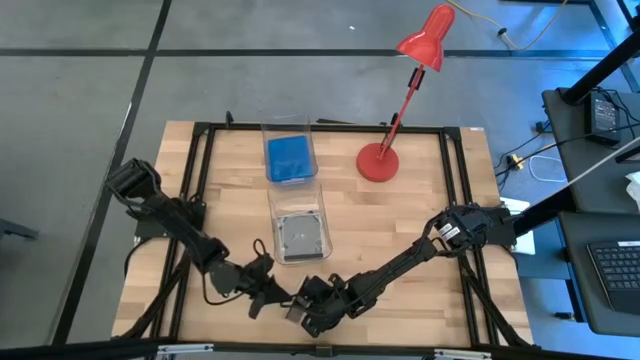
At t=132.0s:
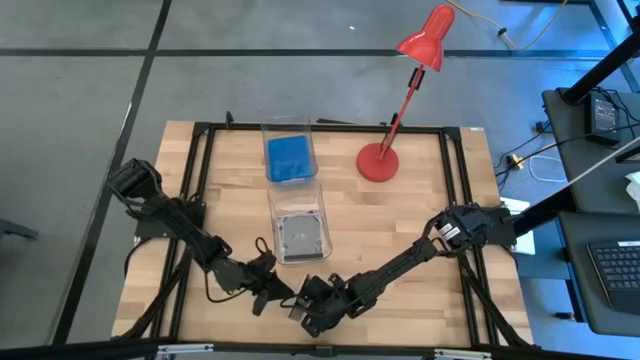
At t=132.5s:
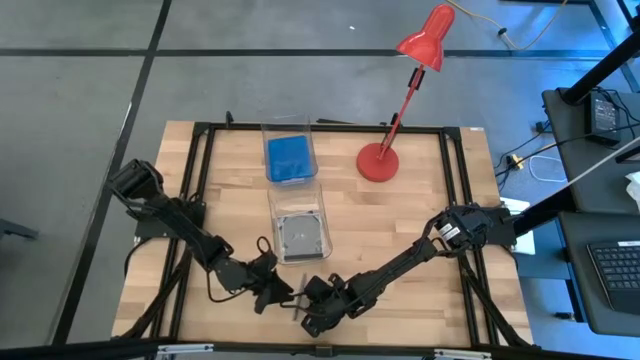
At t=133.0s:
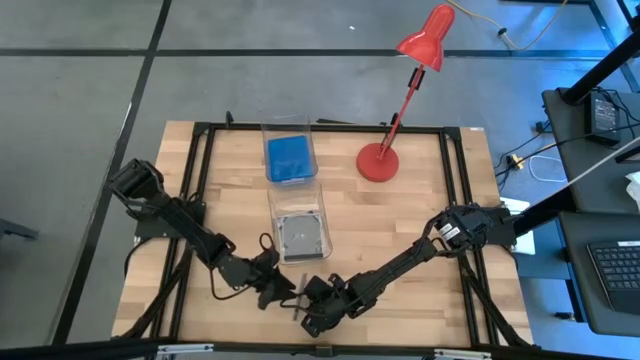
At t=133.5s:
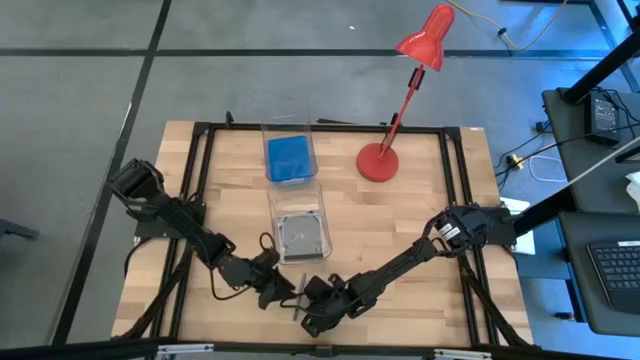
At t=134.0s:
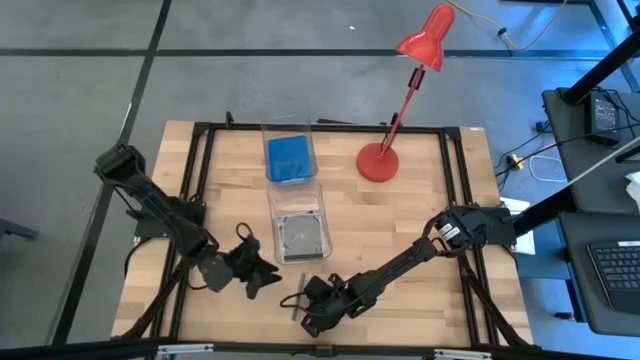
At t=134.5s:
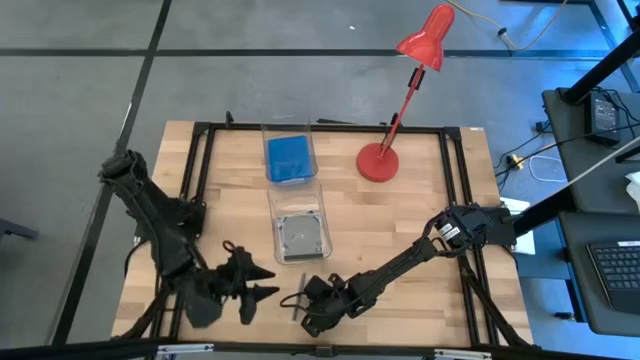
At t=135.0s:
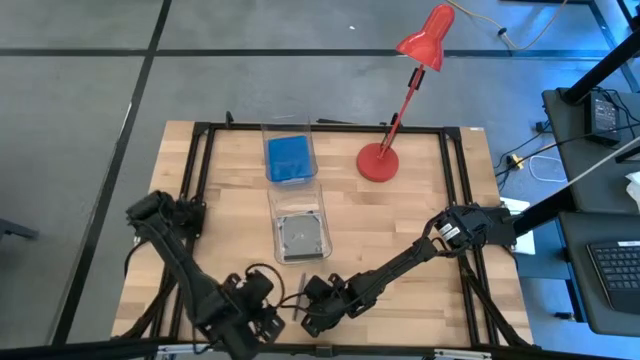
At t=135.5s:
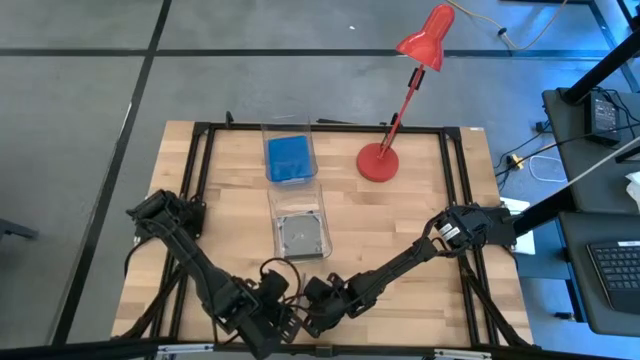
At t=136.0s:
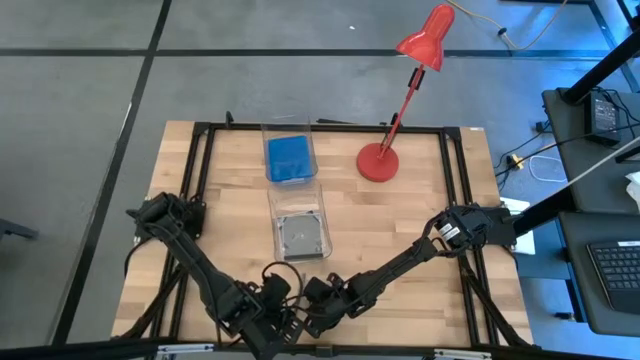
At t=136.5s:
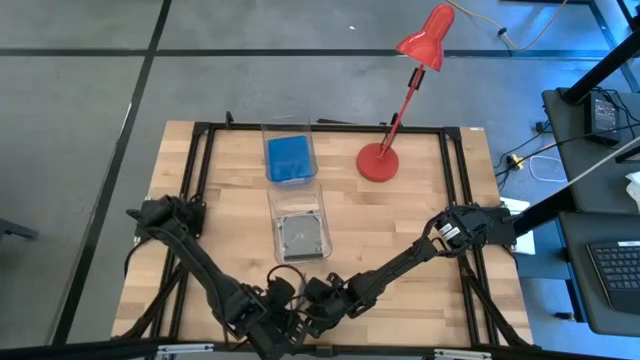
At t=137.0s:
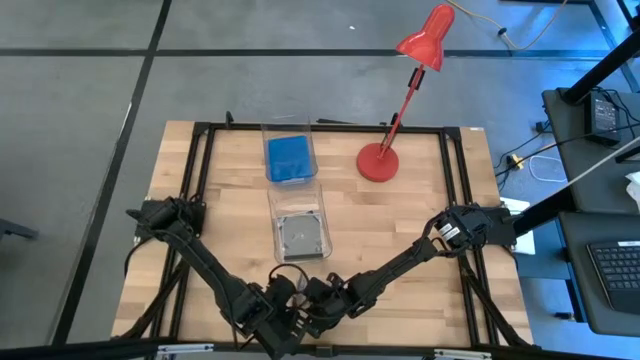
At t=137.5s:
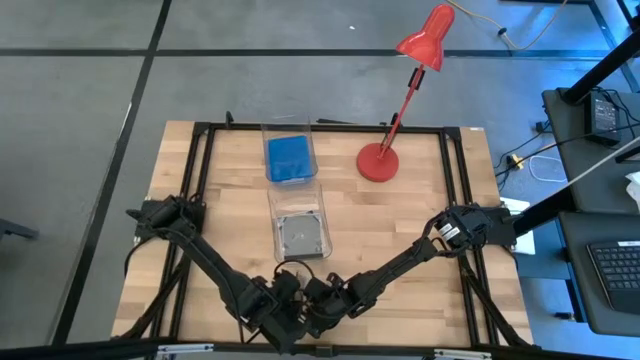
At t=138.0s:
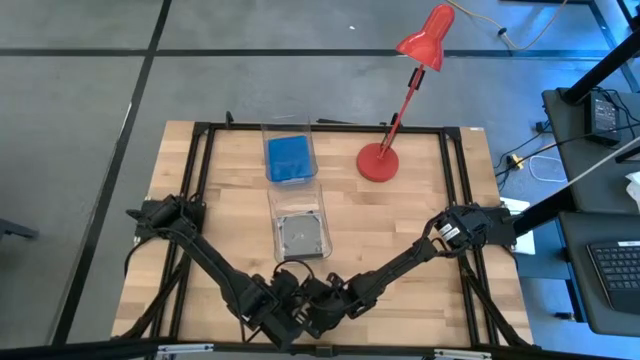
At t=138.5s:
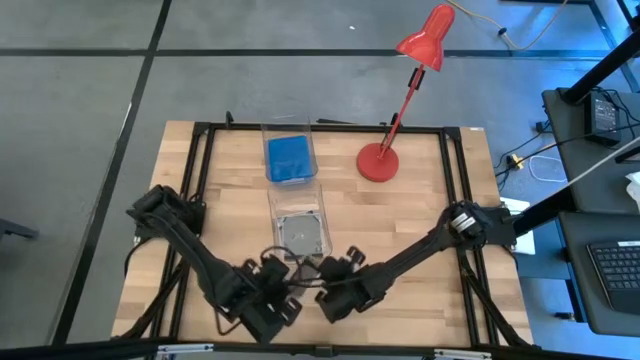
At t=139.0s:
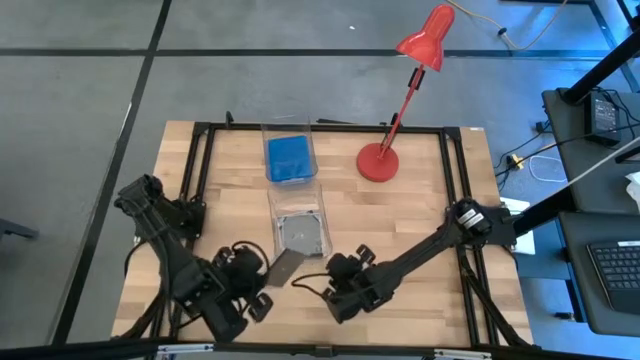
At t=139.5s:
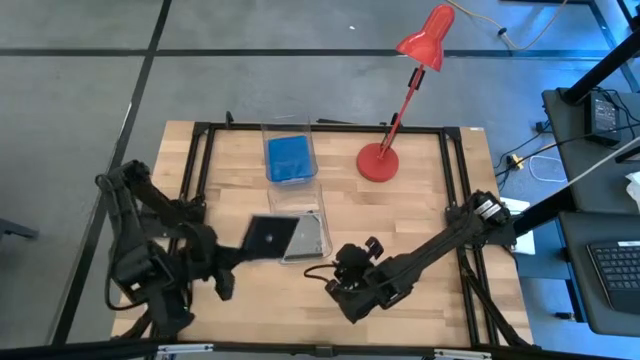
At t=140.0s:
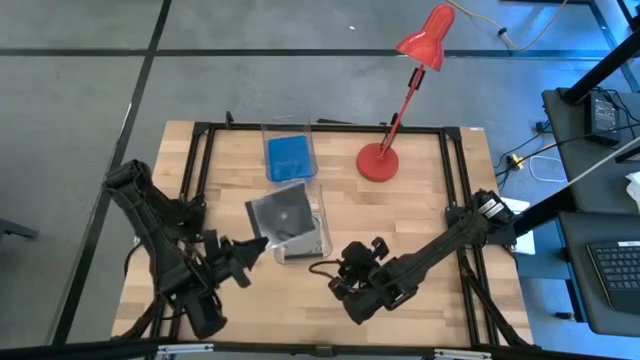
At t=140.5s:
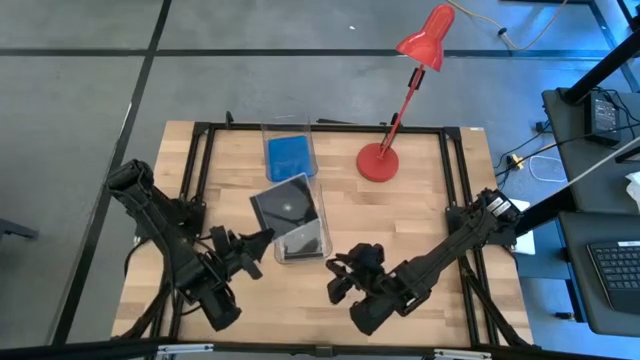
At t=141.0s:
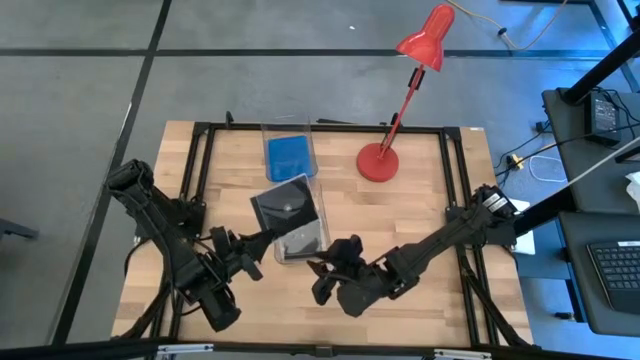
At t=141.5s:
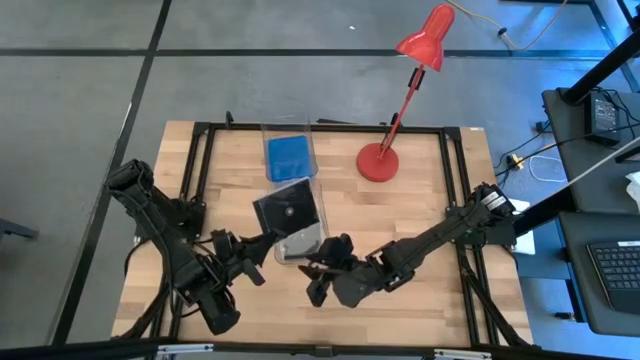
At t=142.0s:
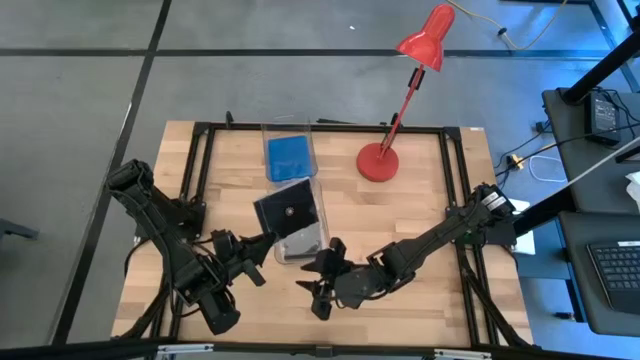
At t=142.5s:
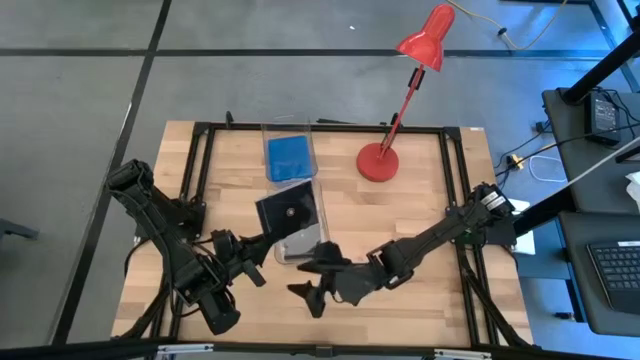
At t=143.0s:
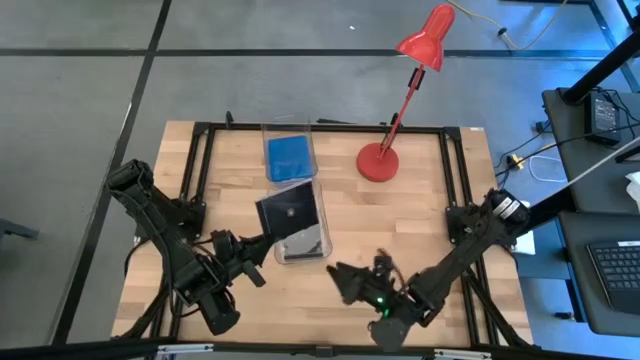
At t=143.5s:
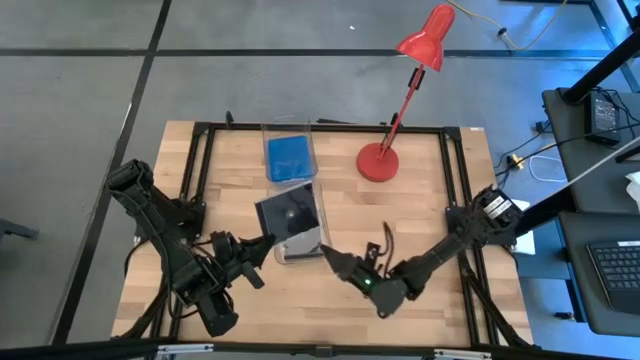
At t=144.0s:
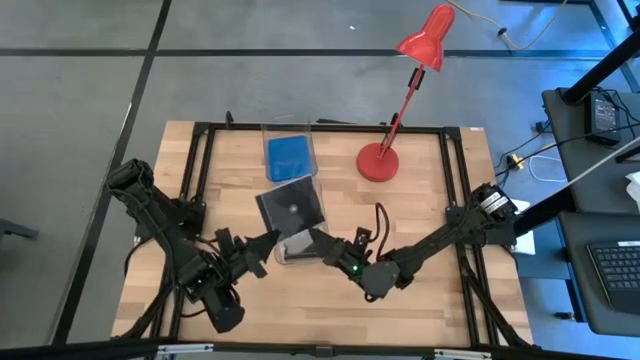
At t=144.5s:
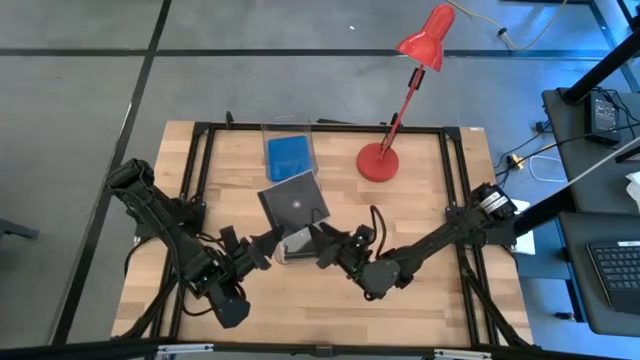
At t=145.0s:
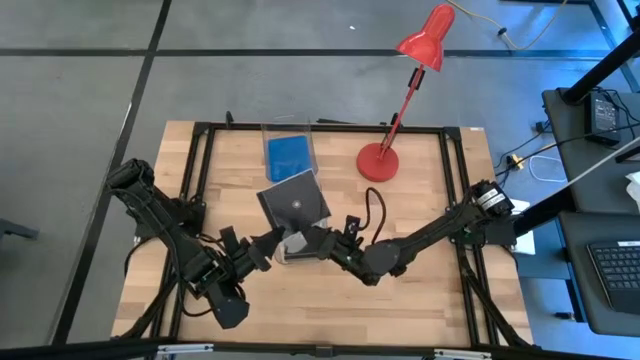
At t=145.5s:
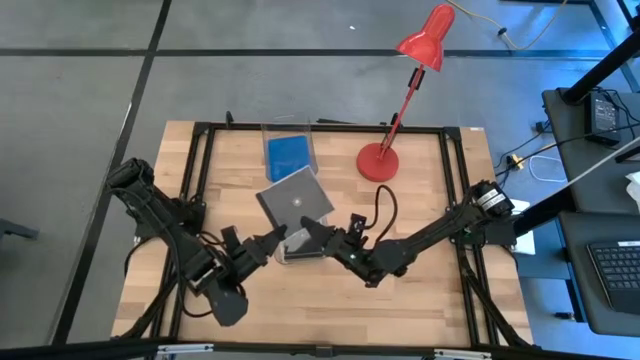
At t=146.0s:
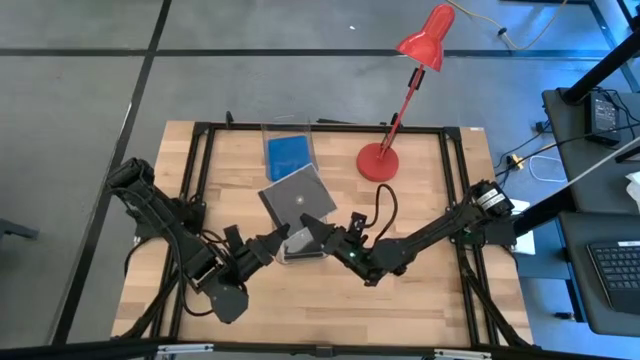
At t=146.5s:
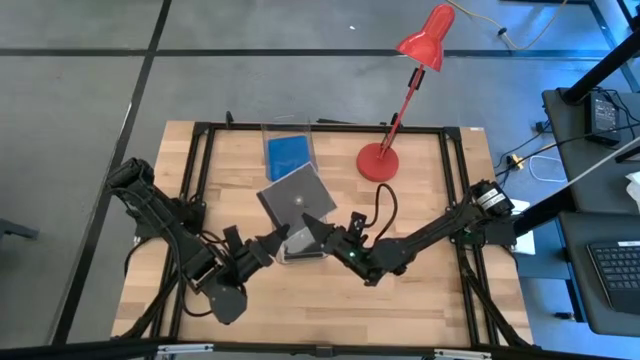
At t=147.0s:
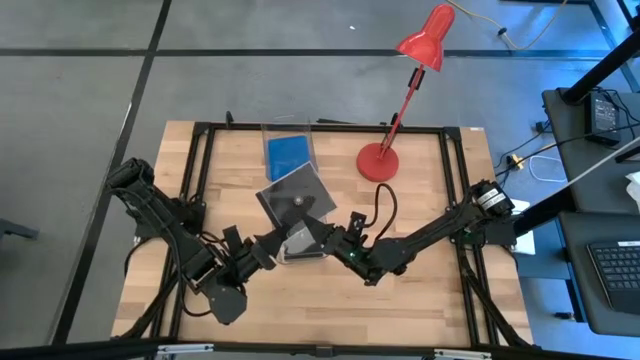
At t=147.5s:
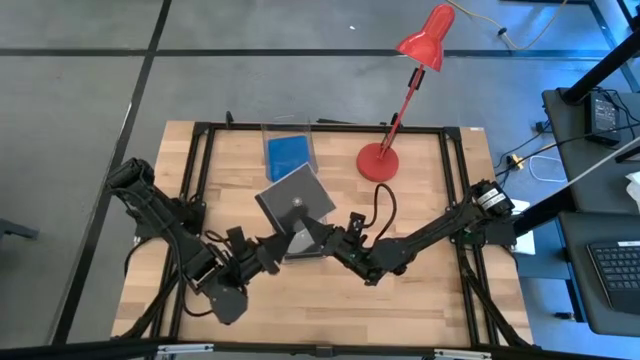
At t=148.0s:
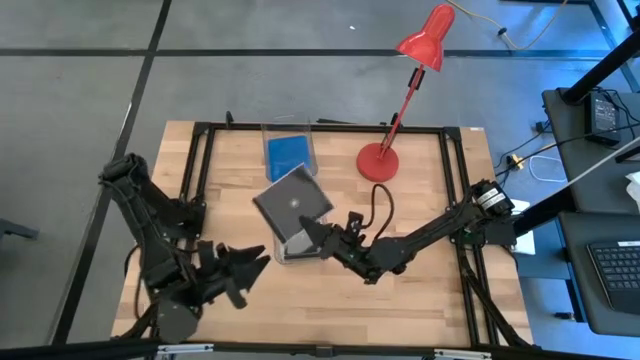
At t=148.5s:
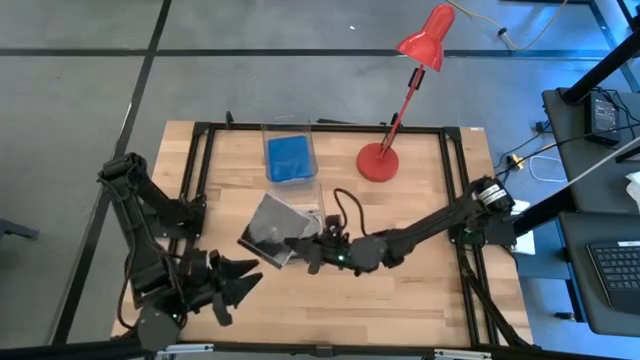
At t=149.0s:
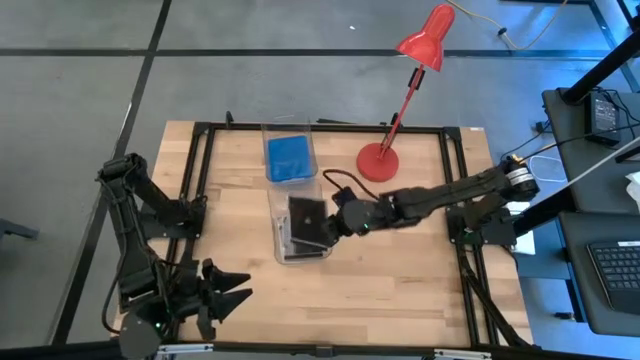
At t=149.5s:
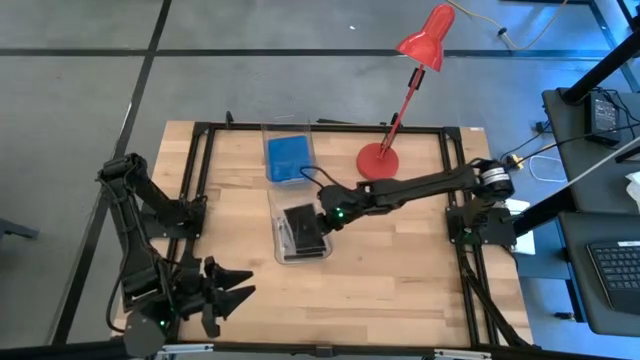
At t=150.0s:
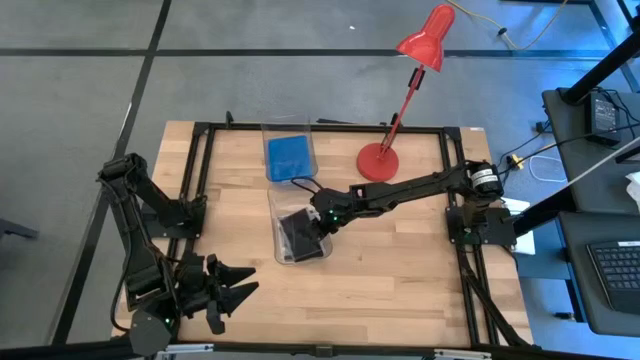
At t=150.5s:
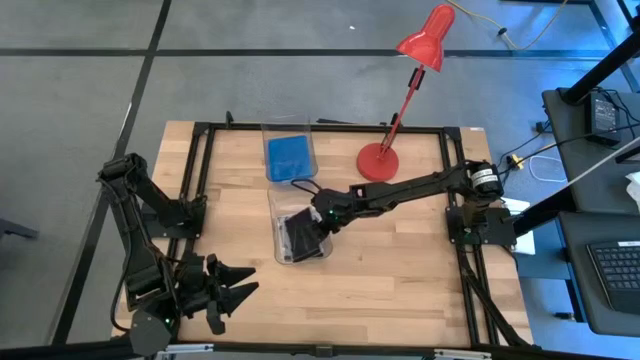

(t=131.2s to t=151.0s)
Task: Pick & place jewel cases by type
Put the black cd case into the bottom transparent bin

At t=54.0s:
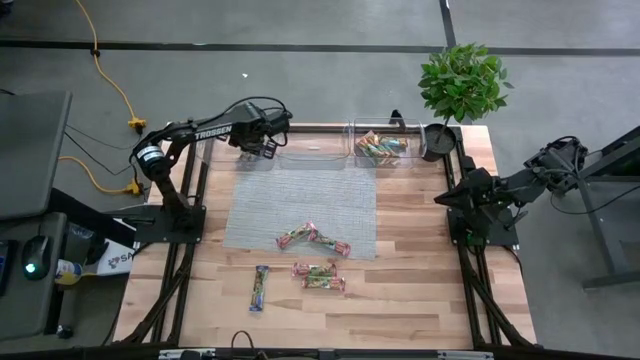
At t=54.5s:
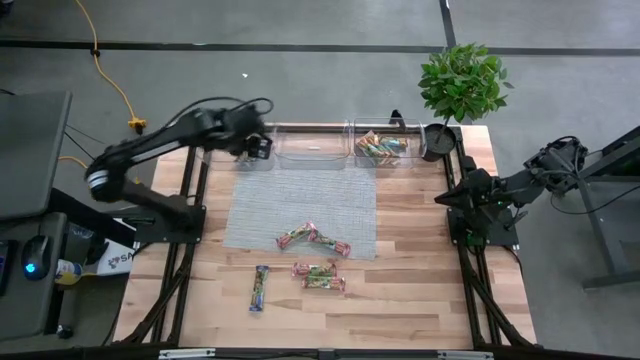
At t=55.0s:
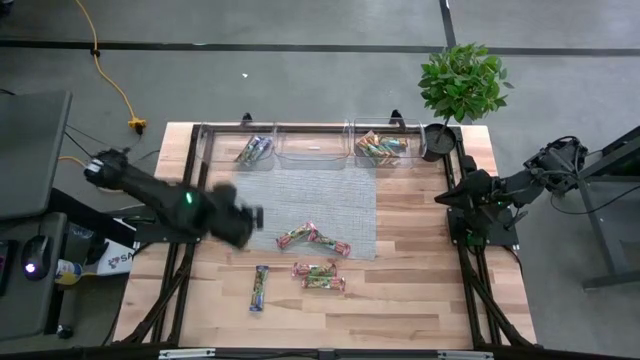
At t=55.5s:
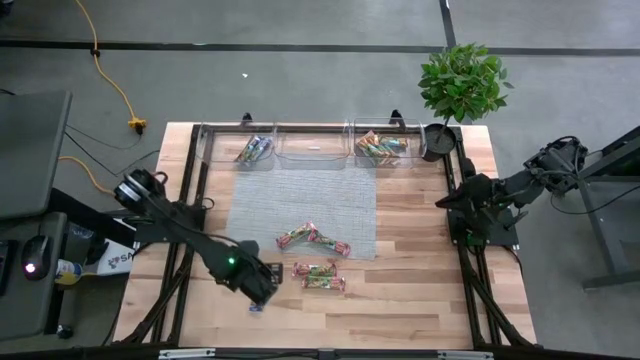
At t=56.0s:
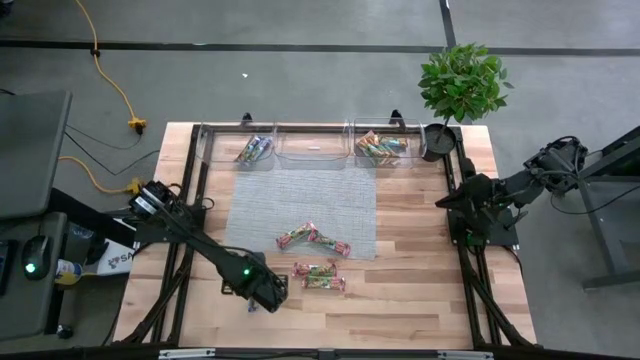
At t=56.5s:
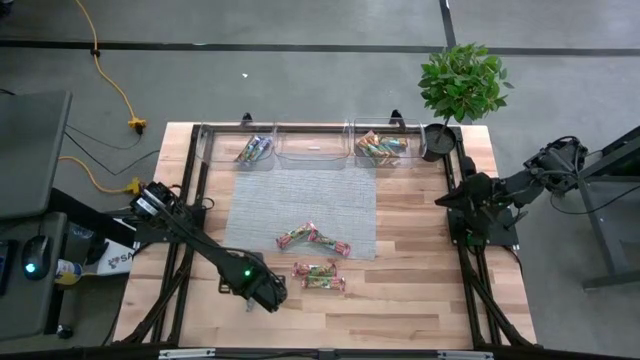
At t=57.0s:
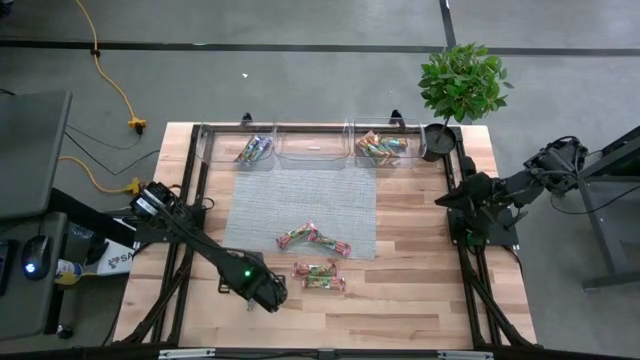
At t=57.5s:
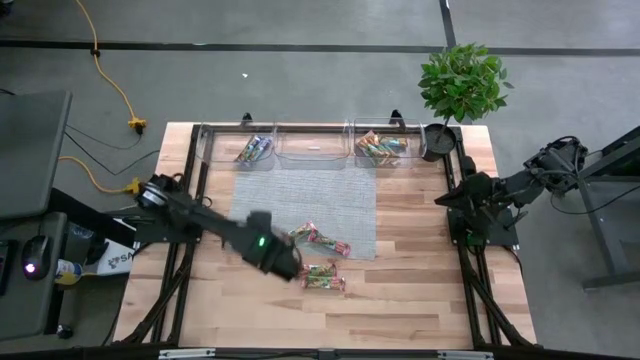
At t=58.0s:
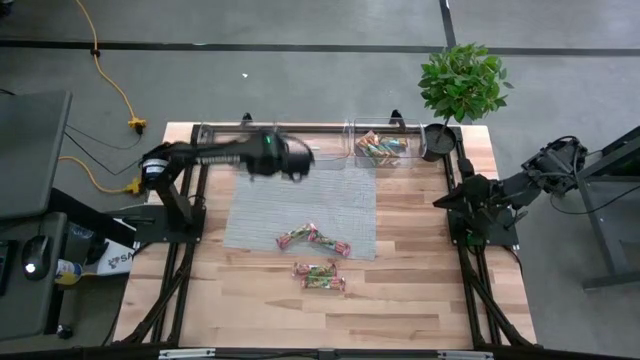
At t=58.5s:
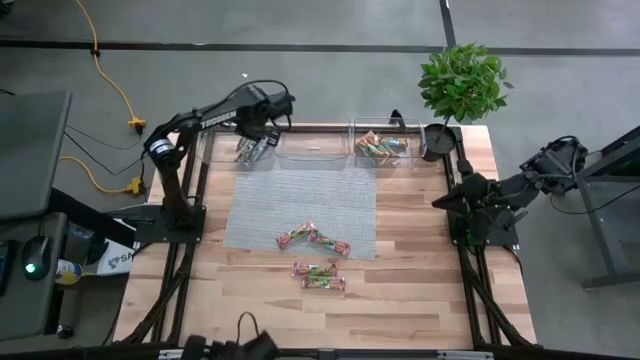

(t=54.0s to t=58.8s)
Task: Pick and place Granola Bars by type
Put the blue granola bar into the left transparent bin
